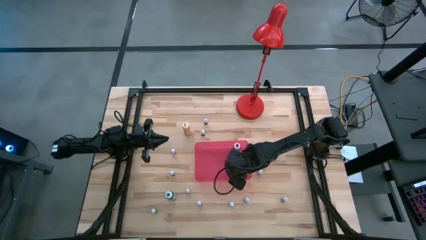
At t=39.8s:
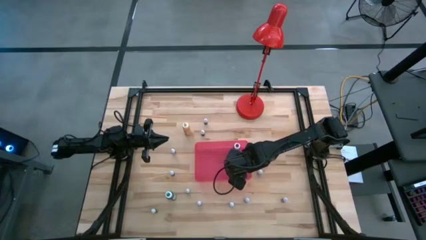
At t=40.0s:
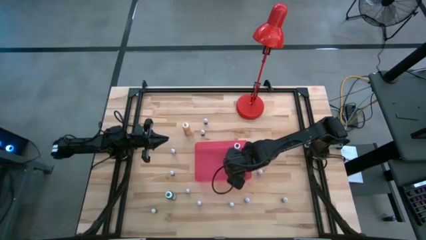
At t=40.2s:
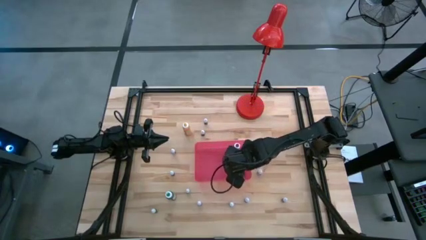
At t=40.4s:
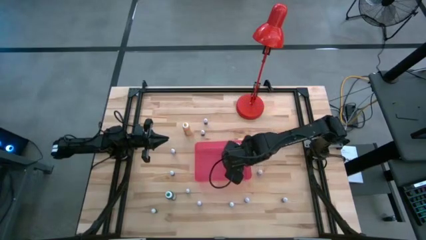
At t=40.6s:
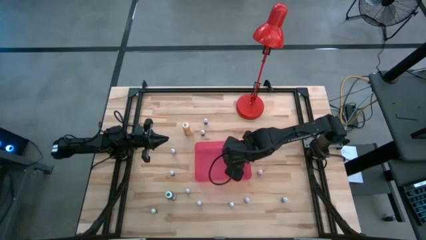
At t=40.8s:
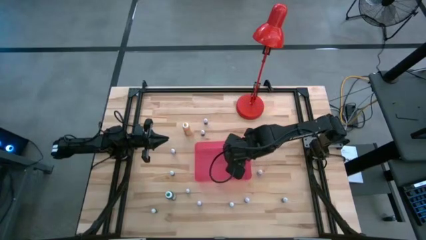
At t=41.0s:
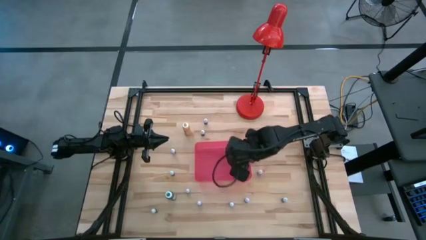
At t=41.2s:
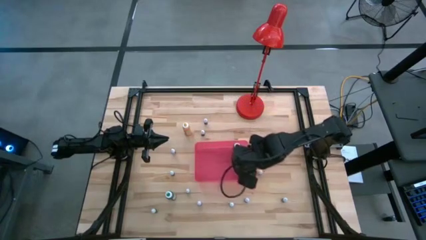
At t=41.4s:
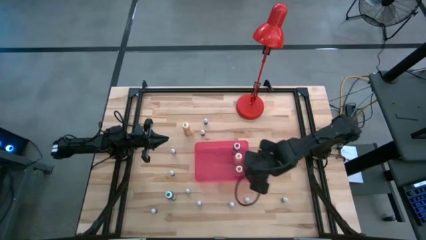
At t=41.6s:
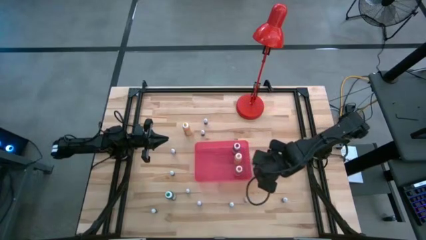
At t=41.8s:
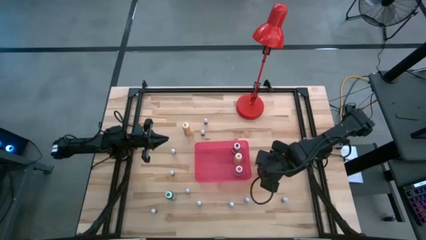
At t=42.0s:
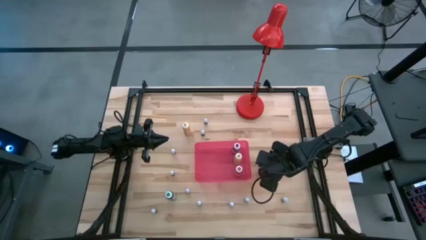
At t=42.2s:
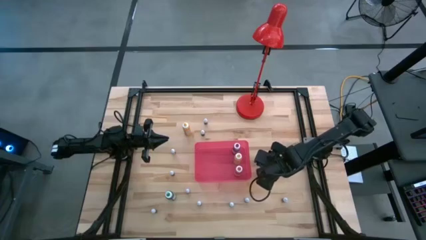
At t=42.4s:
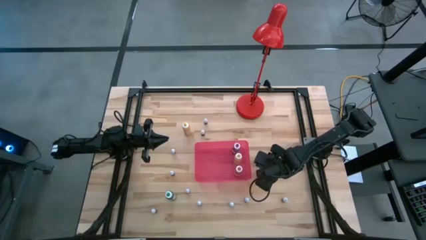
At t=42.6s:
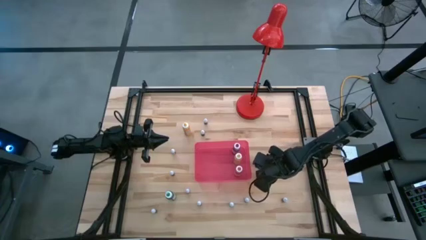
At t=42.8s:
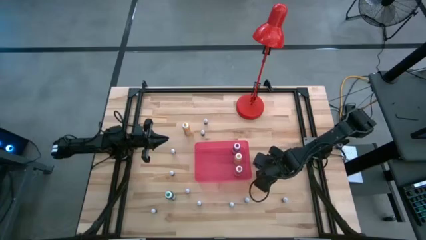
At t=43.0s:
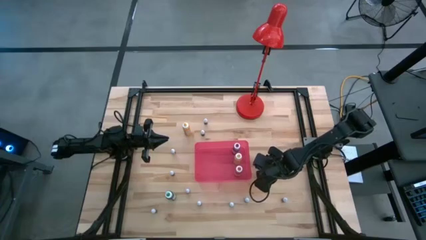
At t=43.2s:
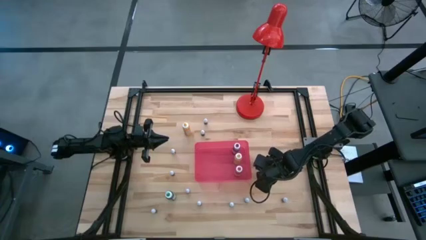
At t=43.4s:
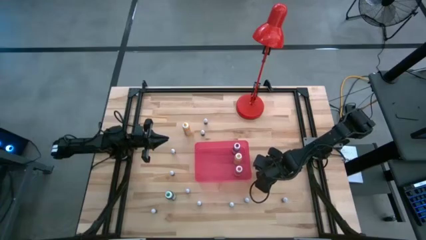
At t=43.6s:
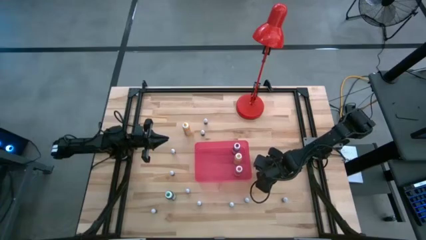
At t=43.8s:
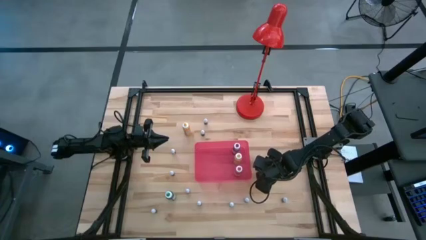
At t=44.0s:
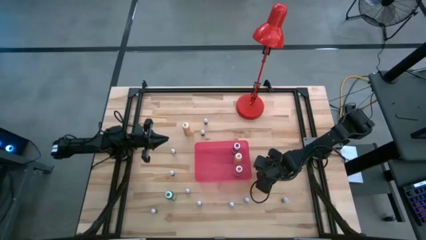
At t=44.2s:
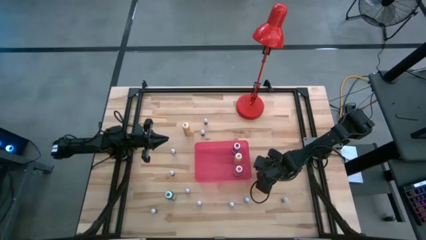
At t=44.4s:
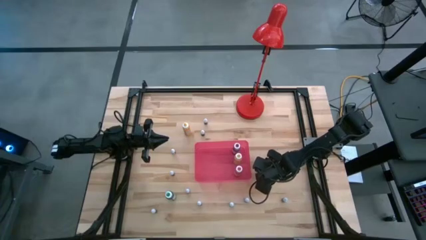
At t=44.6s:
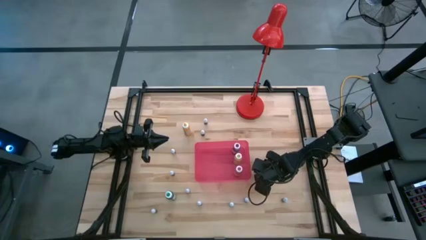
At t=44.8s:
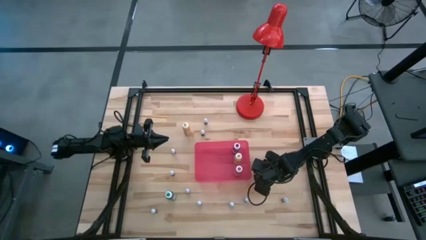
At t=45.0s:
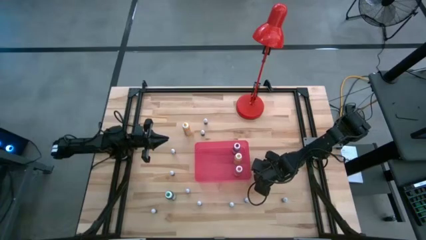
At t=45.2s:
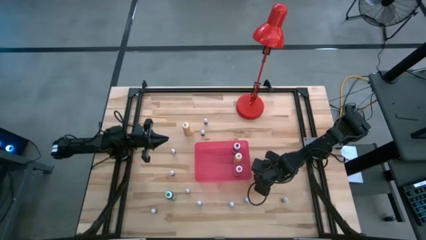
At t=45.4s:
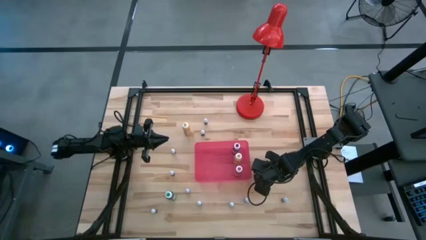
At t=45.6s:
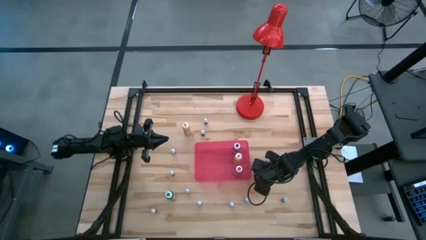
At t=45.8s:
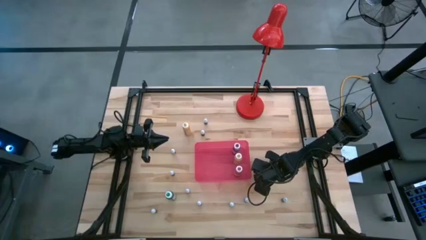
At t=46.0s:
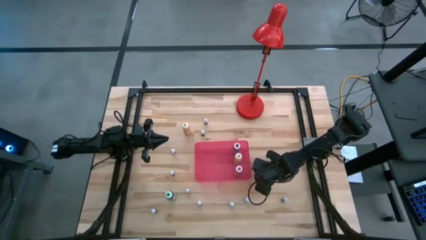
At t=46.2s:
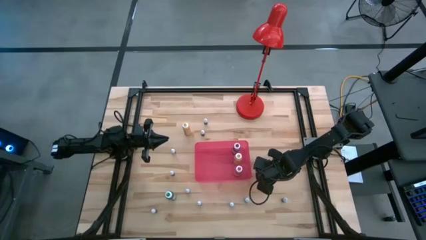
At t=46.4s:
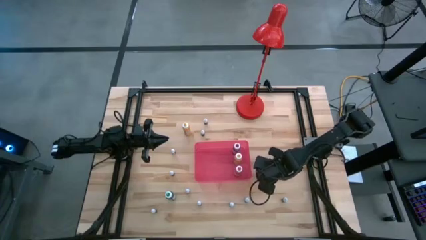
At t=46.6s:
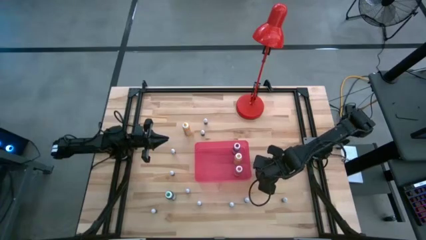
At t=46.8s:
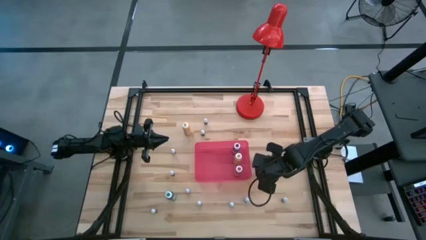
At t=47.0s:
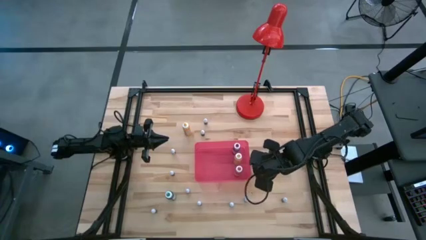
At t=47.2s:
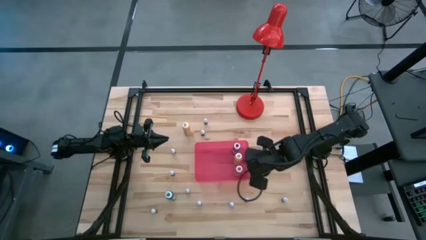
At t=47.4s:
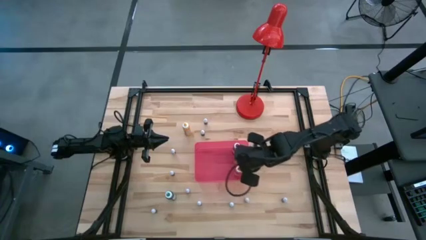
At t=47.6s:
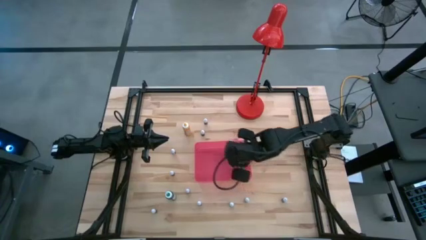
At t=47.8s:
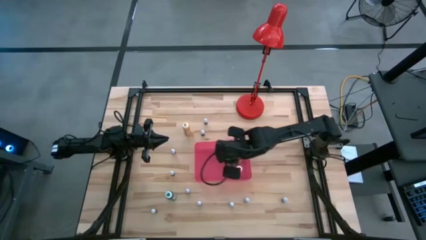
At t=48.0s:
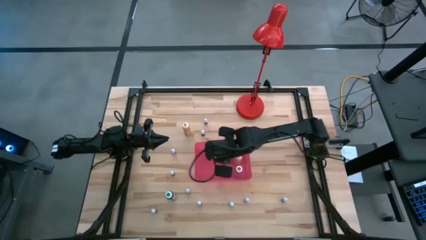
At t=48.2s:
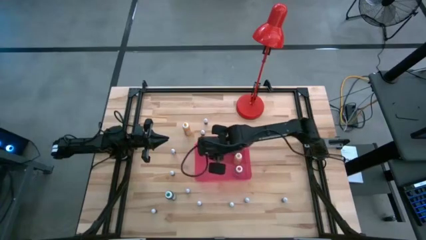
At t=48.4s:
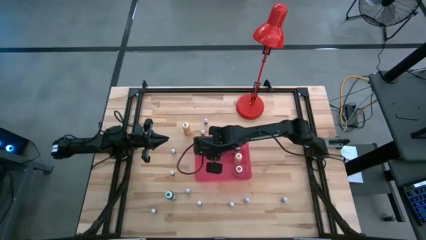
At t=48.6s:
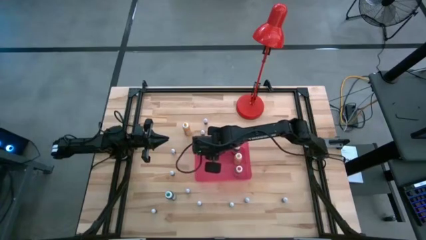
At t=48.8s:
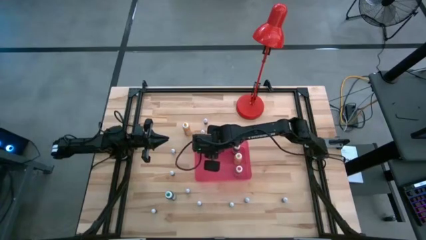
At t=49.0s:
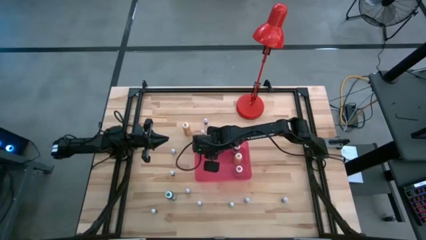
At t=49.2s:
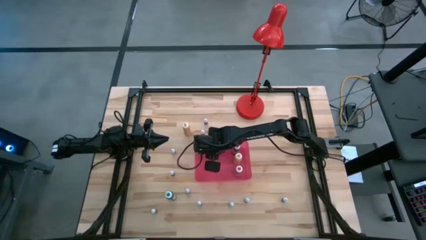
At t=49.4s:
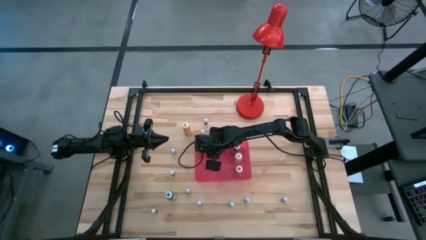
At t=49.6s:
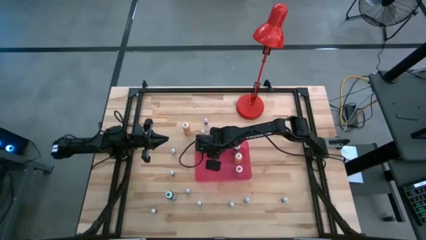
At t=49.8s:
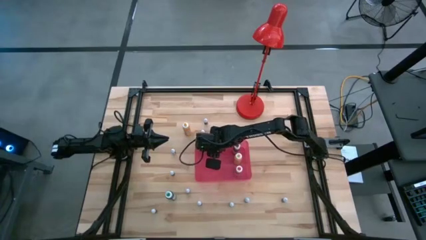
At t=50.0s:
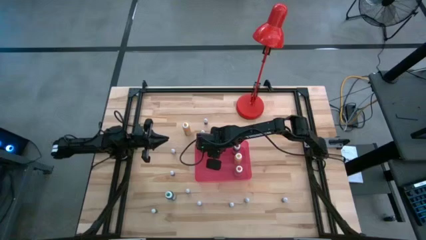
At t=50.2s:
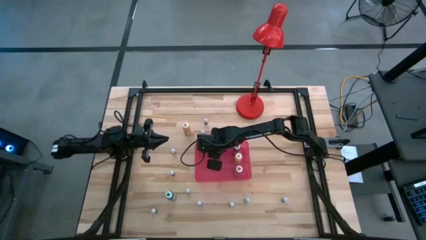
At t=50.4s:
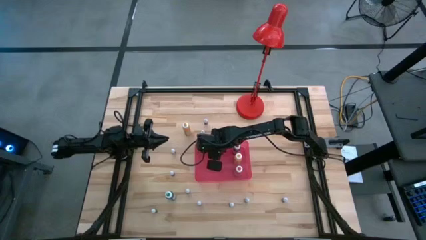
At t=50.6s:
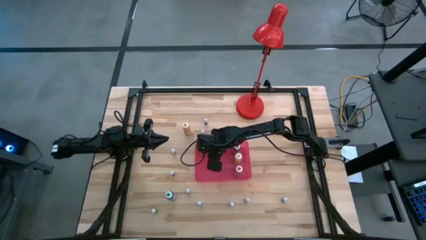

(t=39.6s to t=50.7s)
Task: Pick & Place food coloring
Put the small pink food coloring bottle into the red bin

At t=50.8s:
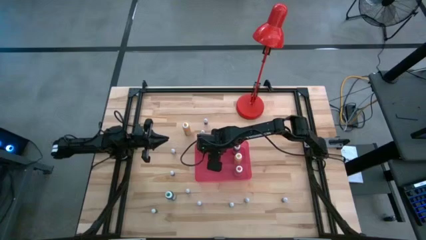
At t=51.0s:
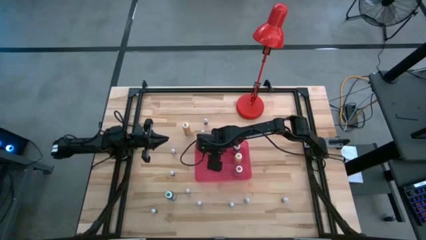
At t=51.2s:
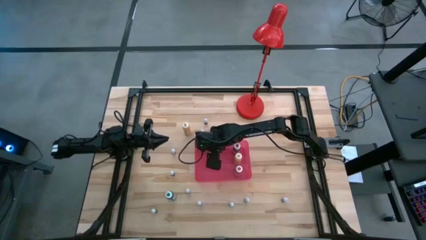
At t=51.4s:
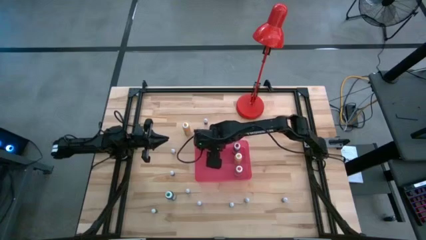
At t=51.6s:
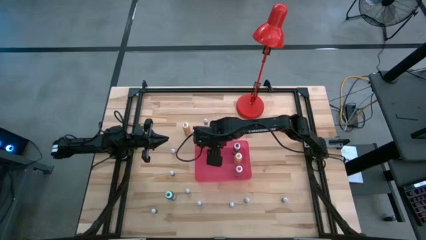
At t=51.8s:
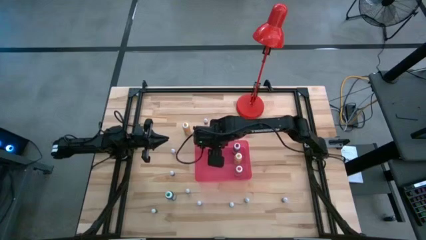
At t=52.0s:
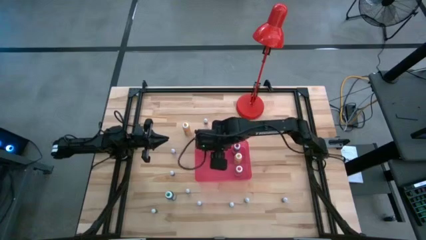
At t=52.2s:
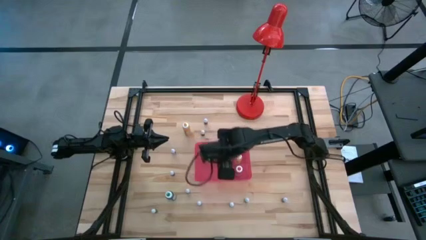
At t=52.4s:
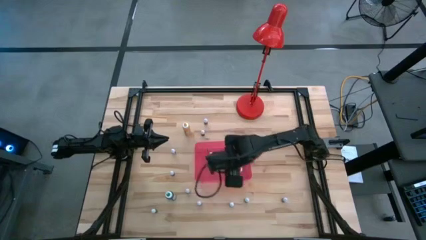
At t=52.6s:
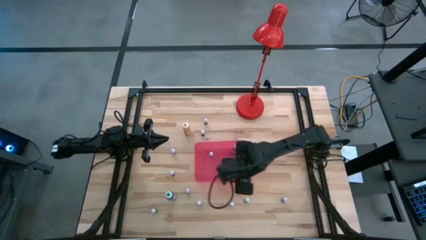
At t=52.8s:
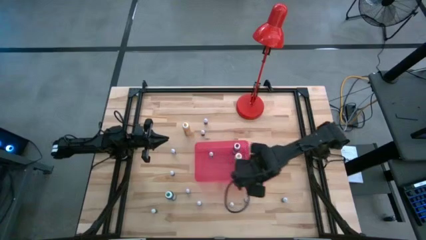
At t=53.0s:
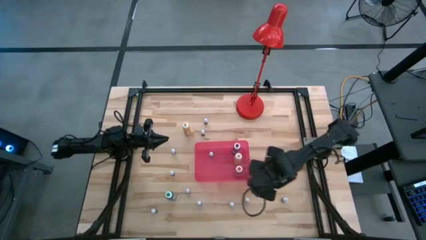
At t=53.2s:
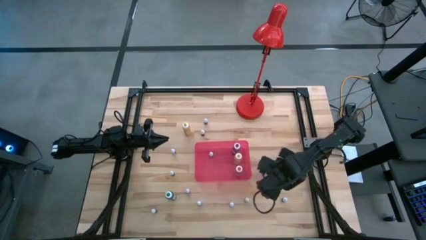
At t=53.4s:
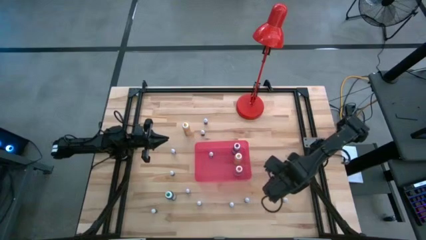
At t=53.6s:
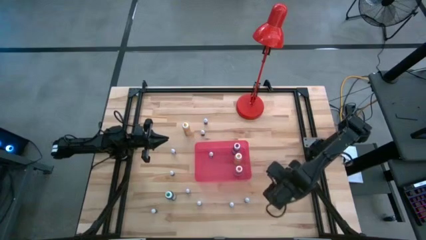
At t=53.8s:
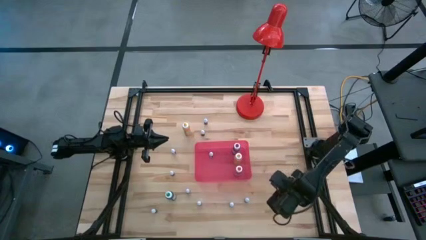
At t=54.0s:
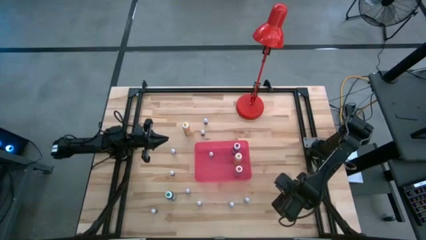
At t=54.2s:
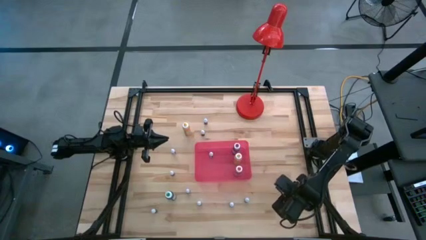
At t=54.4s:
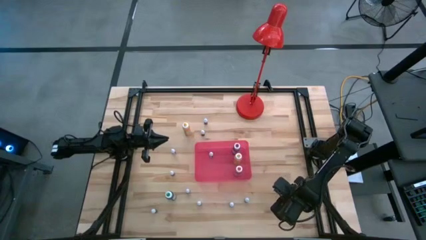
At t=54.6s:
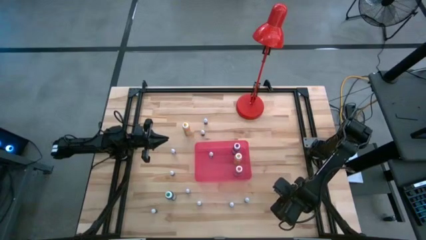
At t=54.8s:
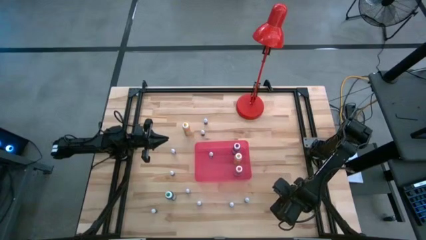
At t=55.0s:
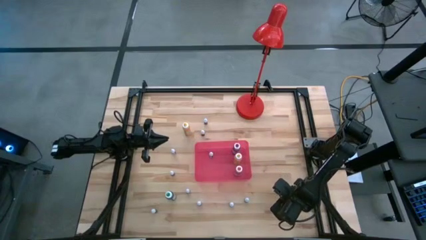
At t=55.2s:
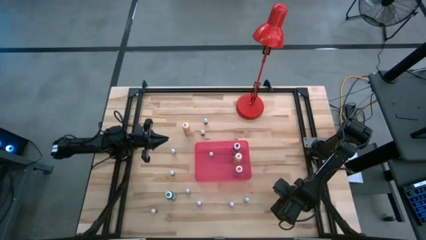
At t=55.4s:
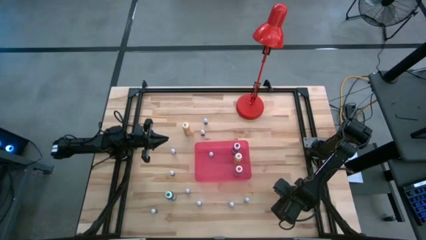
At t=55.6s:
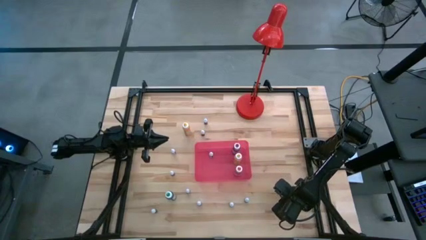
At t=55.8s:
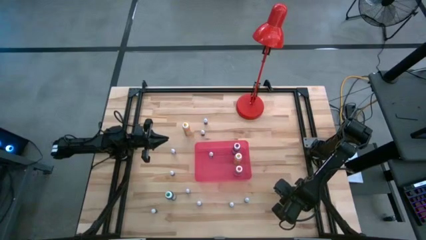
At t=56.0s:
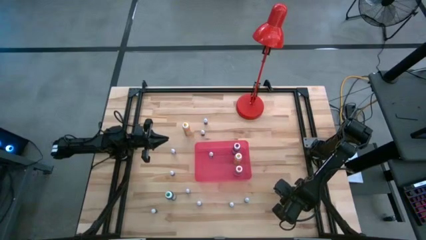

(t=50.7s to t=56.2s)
Put the small red food coloring bottle into the red bin
